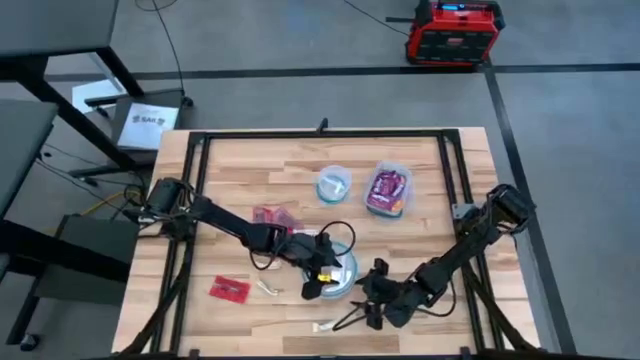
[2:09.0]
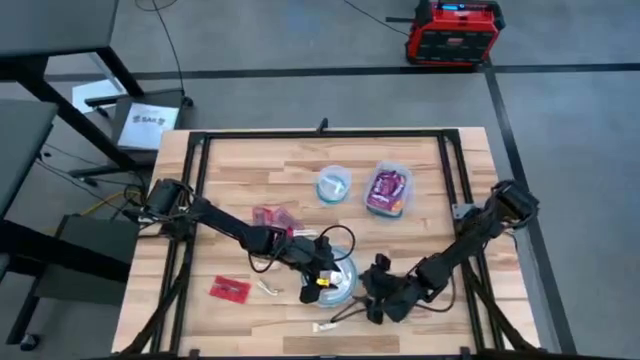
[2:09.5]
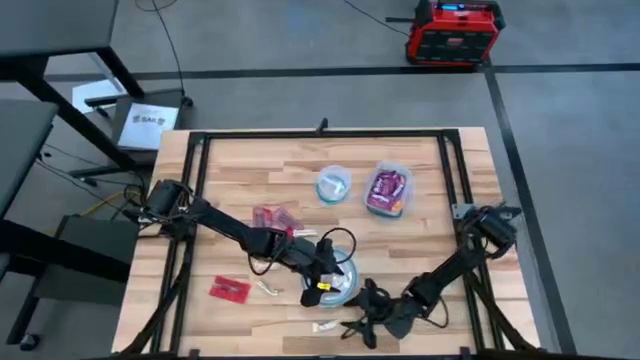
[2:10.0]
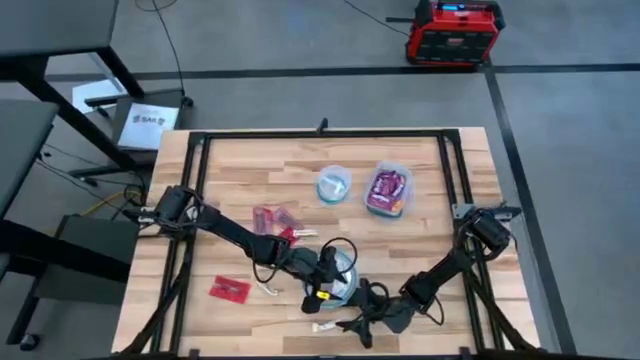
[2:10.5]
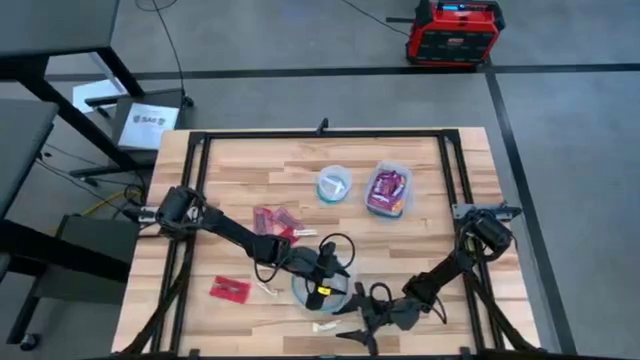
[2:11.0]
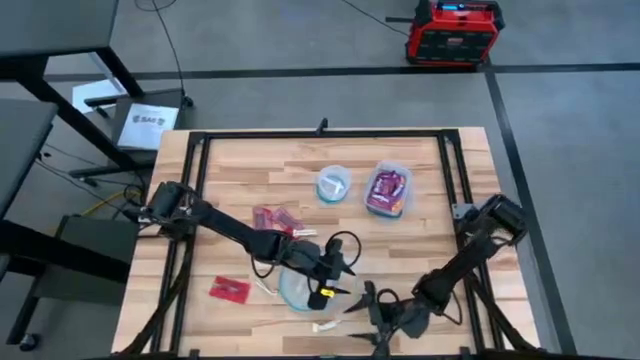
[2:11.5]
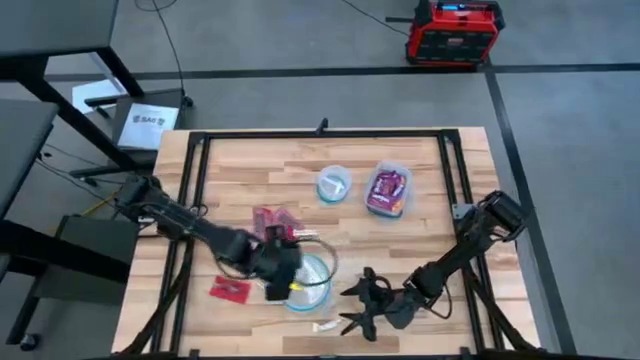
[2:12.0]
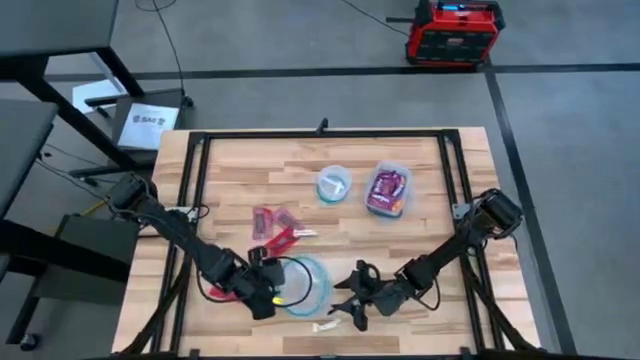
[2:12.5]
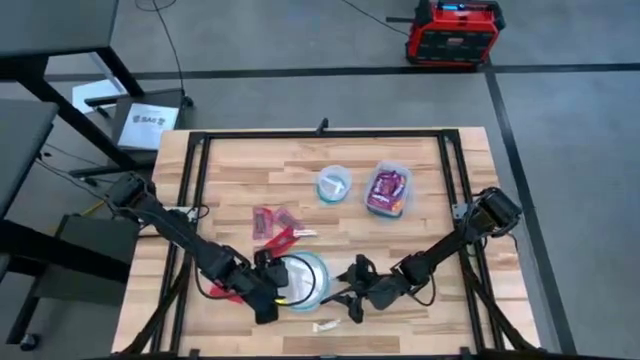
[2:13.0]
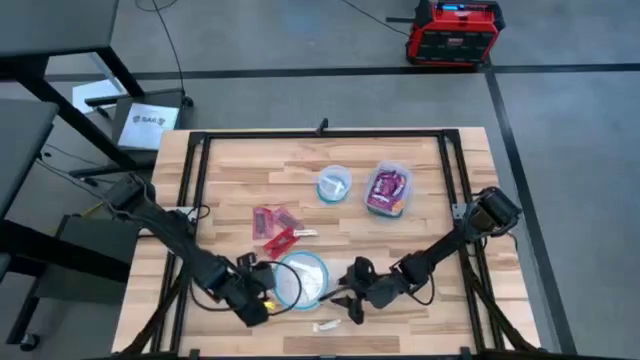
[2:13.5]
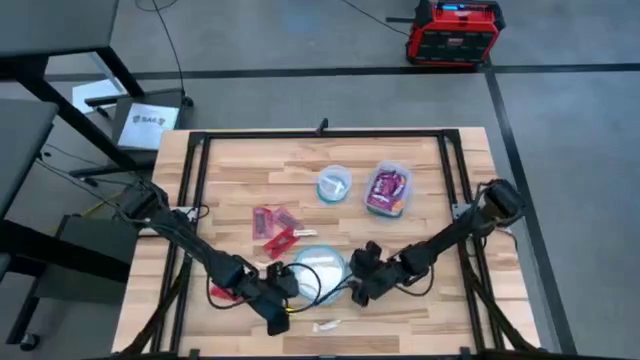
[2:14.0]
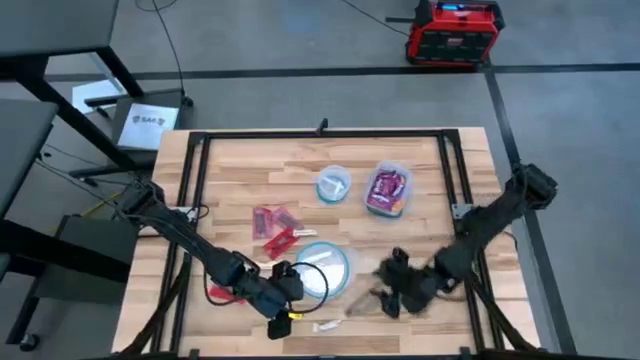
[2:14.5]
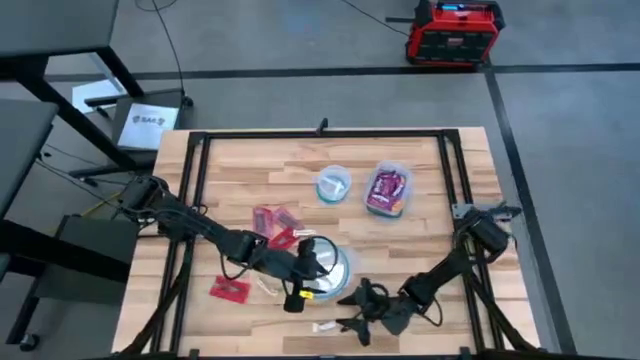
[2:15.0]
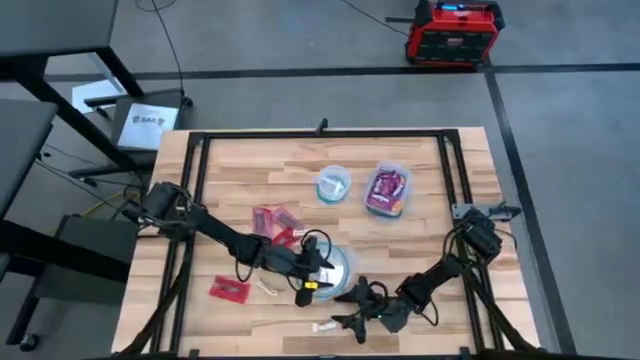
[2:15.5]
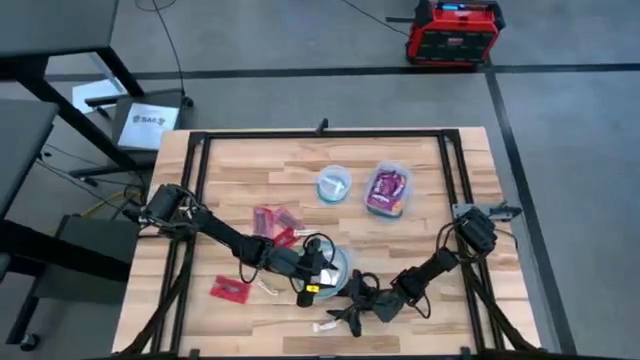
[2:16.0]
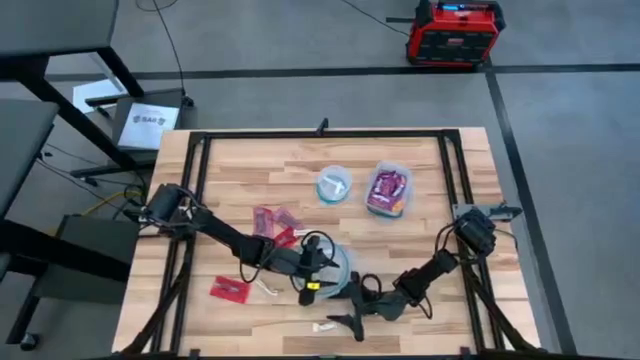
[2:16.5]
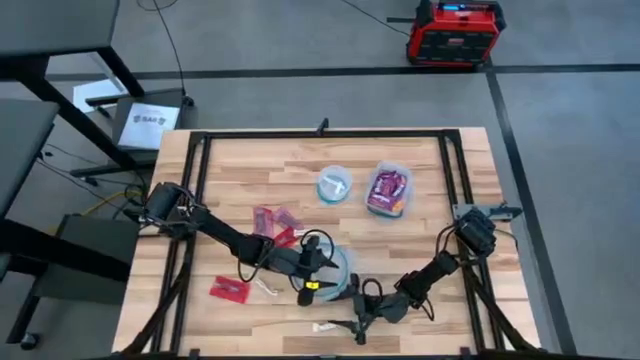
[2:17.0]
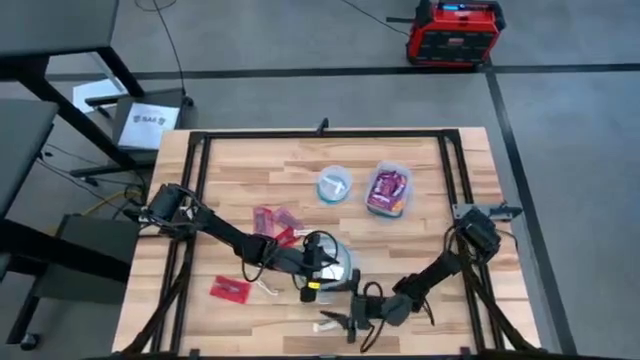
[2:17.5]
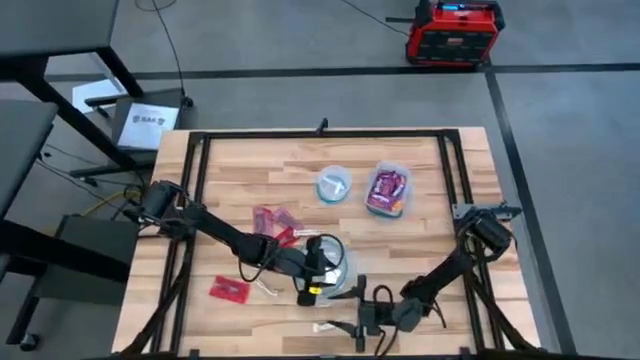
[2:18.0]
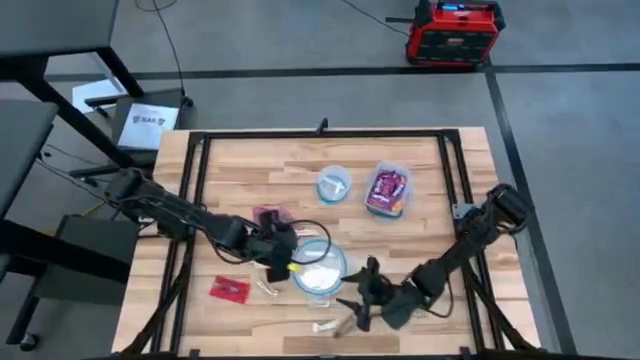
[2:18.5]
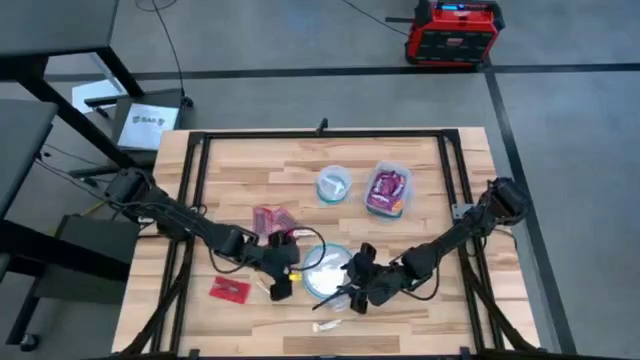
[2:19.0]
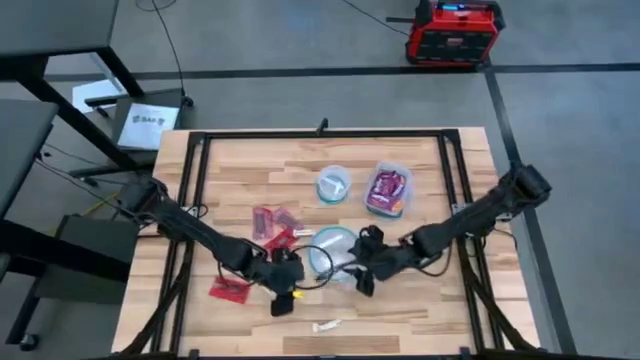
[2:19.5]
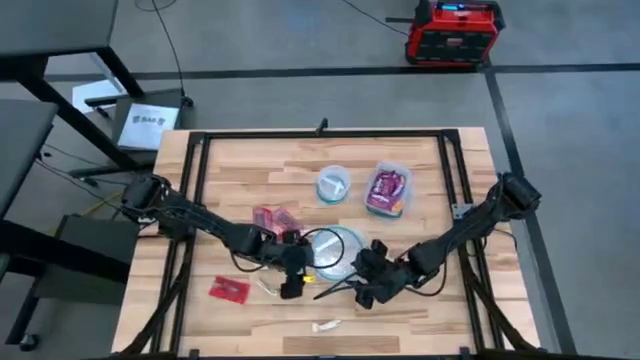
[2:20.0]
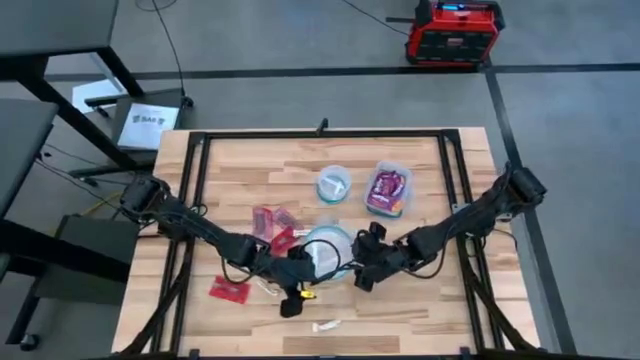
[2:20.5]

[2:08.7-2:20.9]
Task: Sort candy
Open the center transparent bin

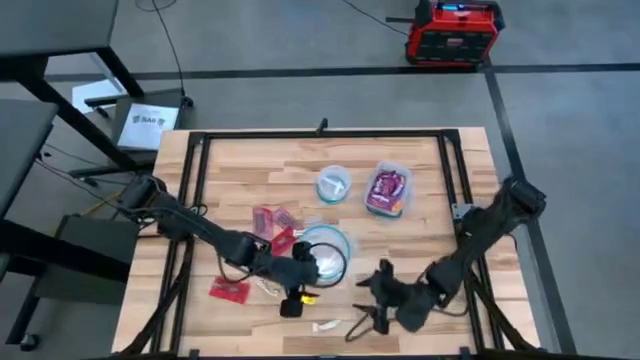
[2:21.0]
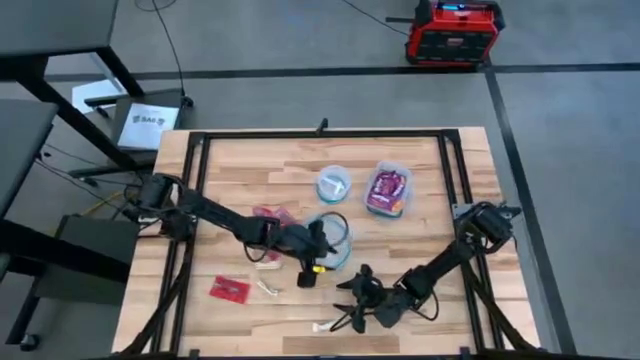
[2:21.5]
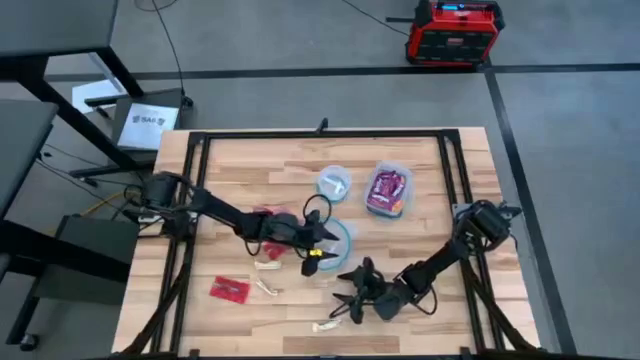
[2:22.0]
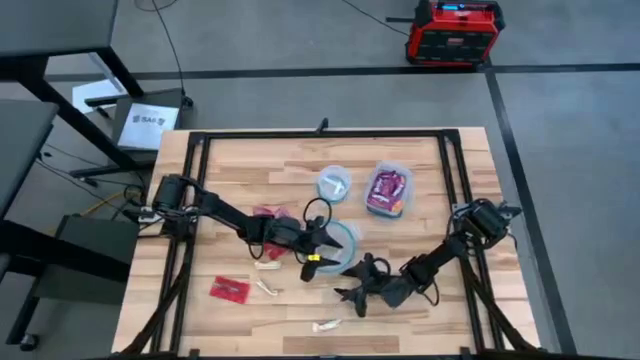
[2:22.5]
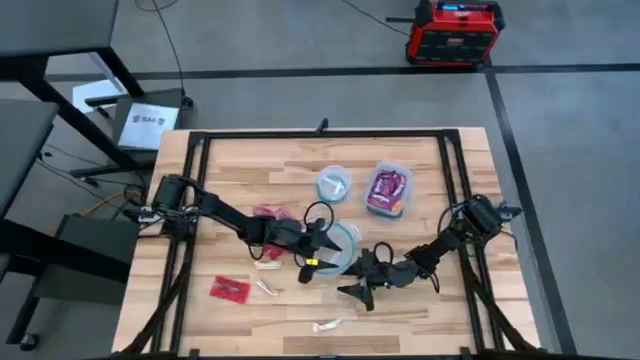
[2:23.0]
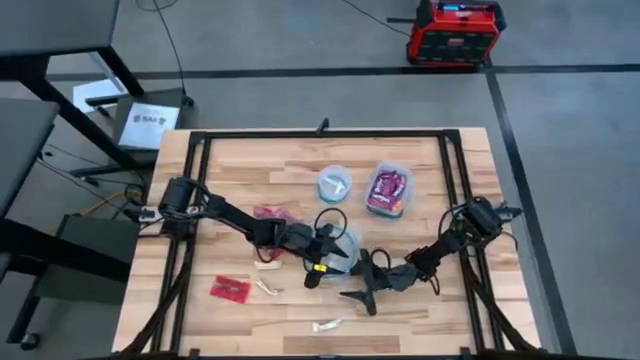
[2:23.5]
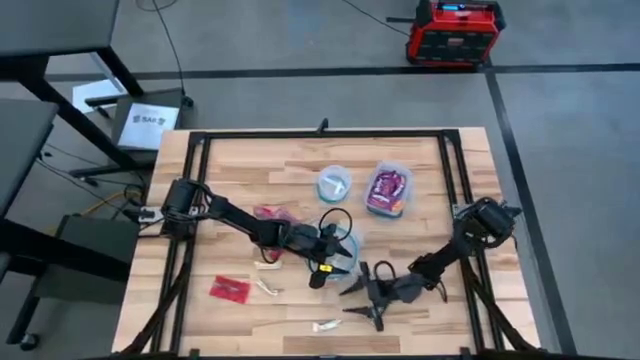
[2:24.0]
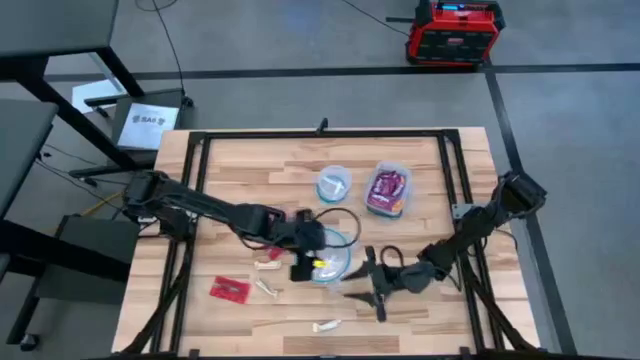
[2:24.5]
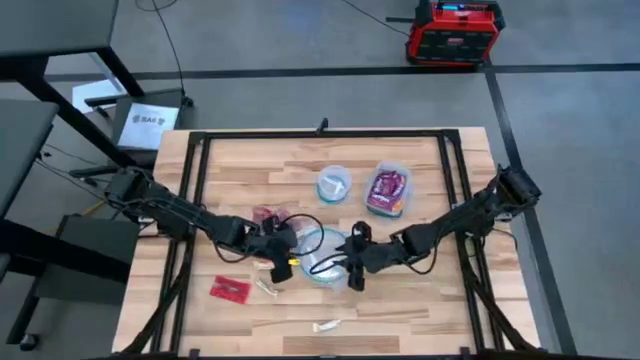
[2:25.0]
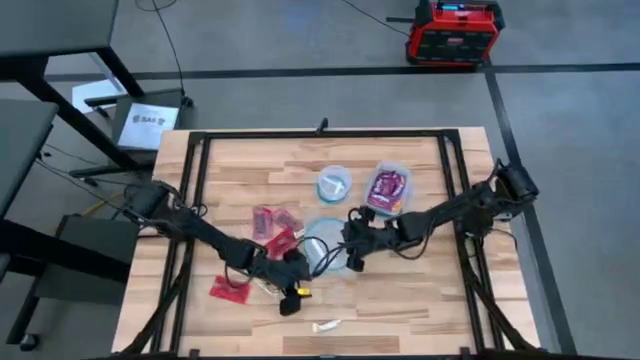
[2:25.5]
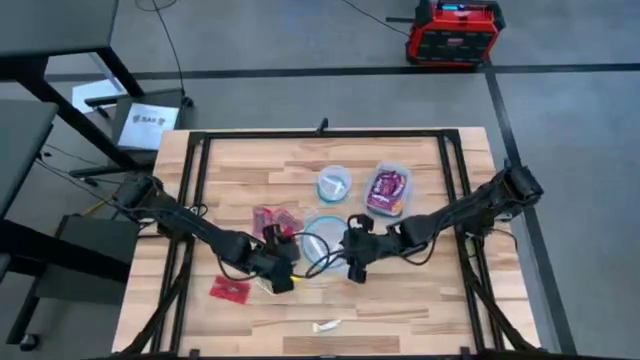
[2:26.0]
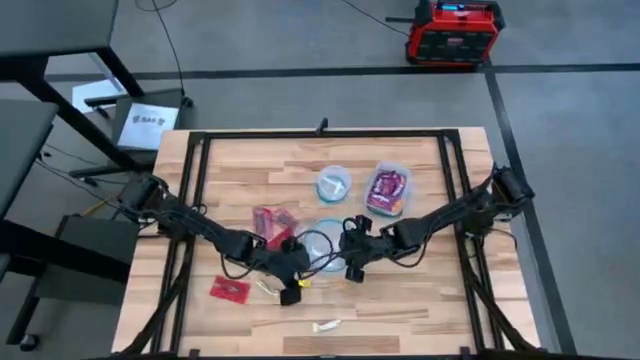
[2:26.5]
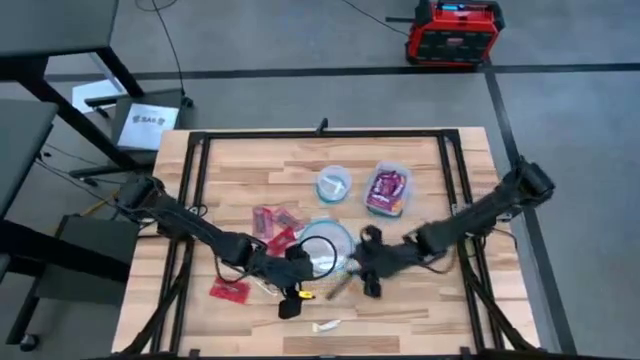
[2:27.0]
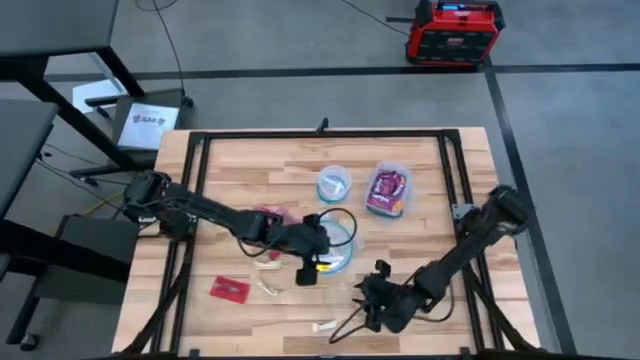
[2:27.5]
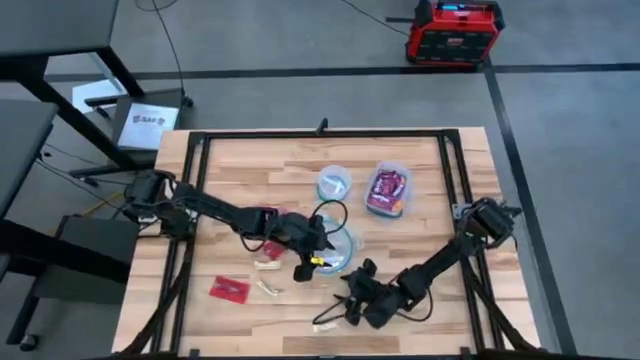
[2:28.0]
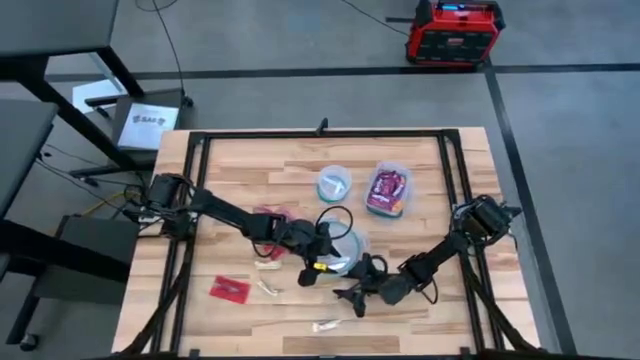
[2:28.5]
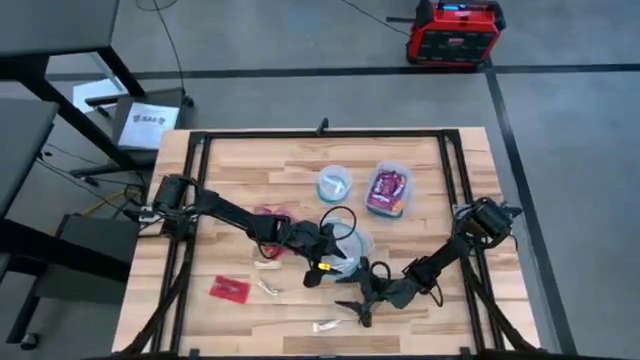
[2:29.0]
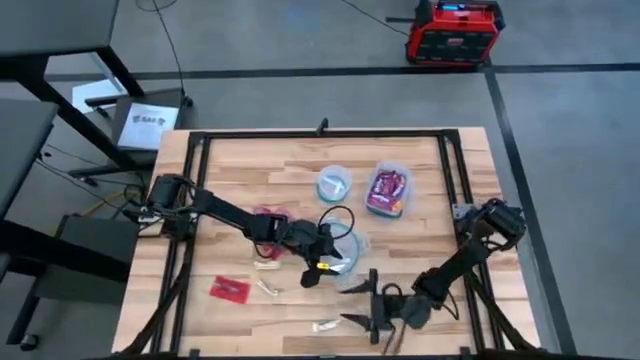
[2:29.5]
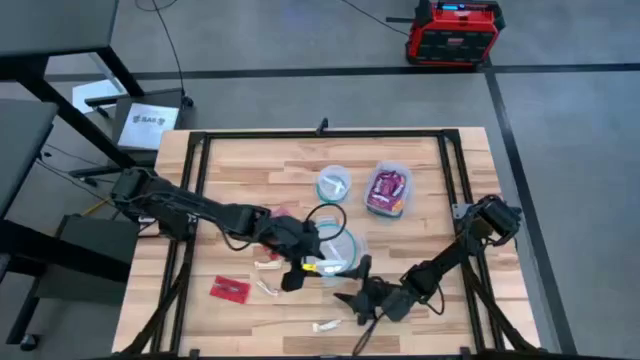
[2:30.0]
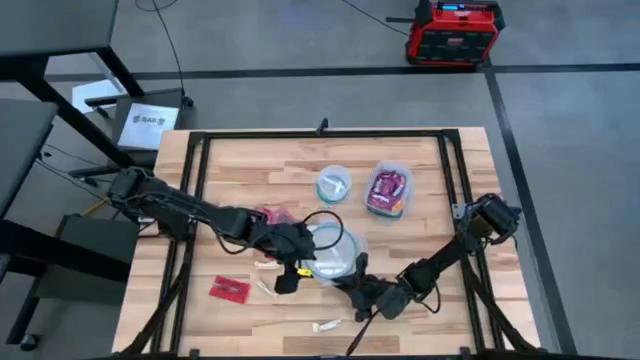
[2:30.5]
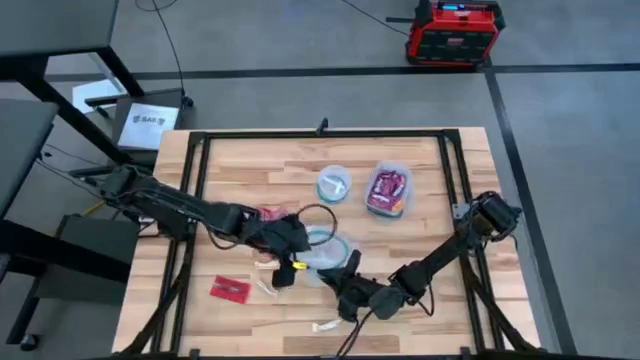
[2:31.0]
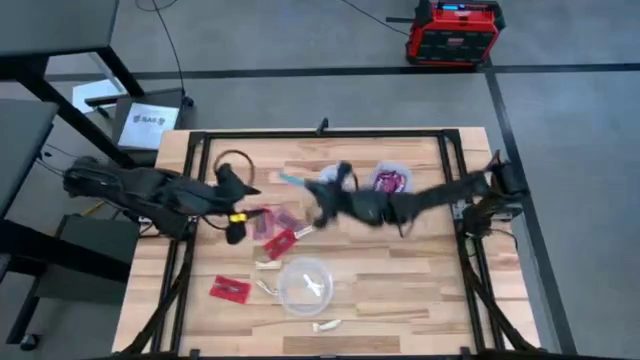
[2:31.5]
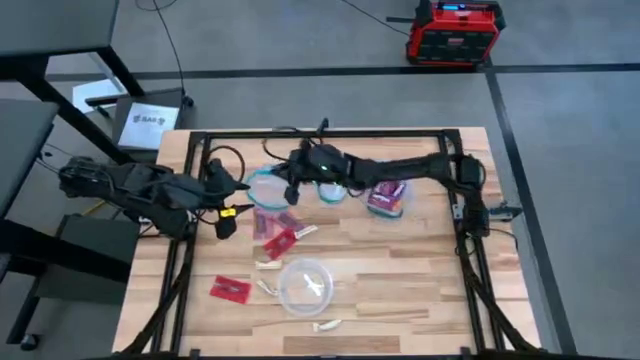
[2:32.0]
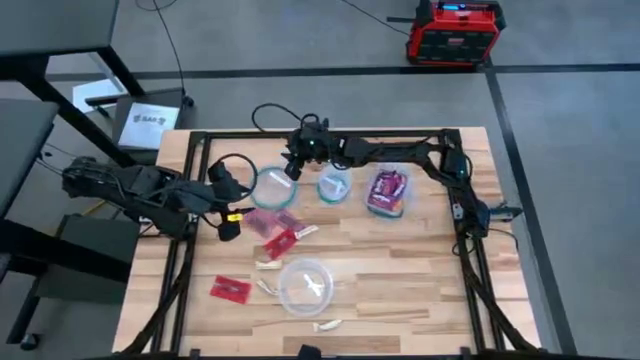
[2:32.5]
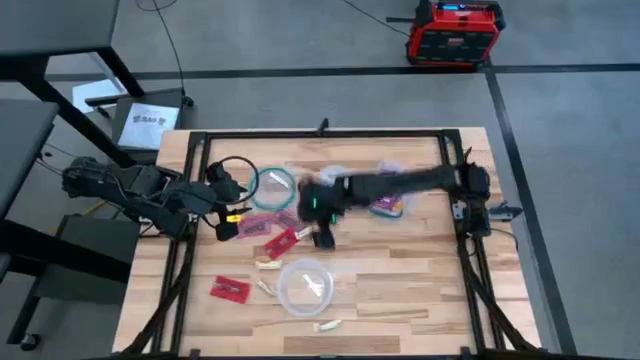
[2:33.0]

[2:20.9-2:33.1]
Open the center transparent bin
